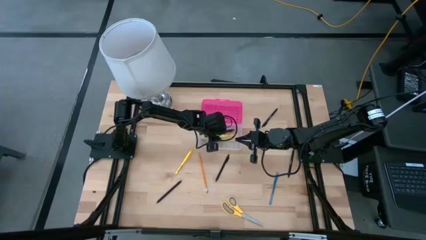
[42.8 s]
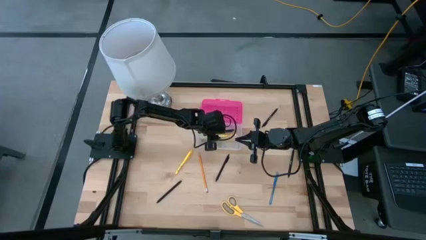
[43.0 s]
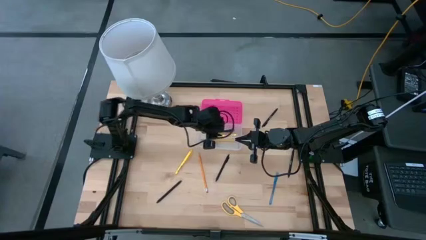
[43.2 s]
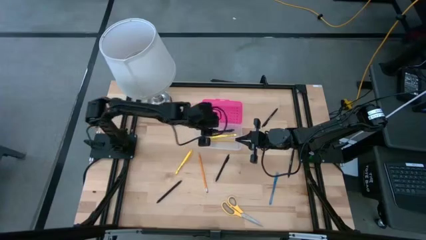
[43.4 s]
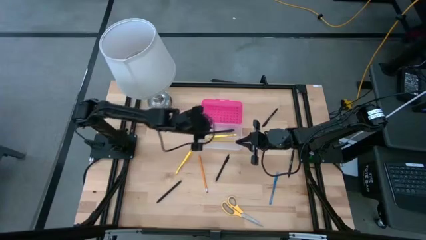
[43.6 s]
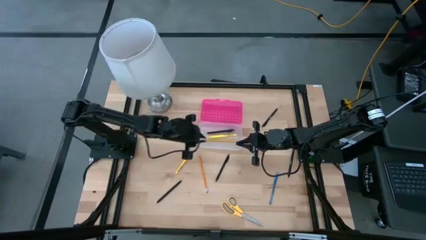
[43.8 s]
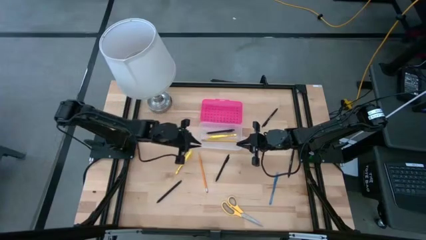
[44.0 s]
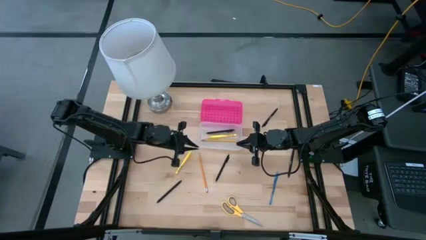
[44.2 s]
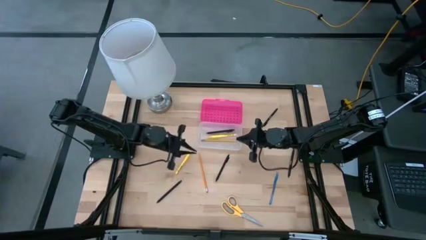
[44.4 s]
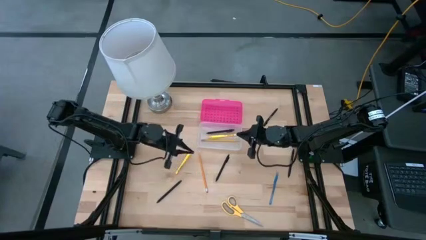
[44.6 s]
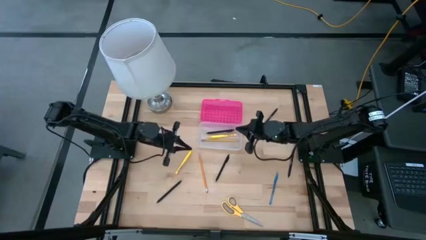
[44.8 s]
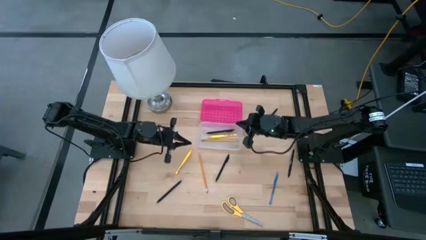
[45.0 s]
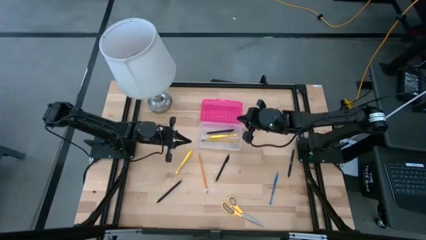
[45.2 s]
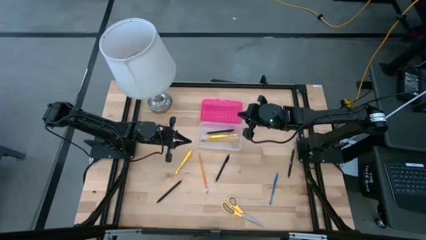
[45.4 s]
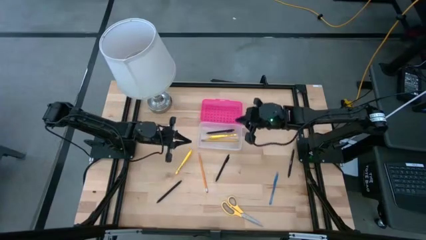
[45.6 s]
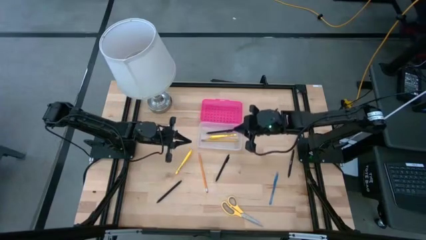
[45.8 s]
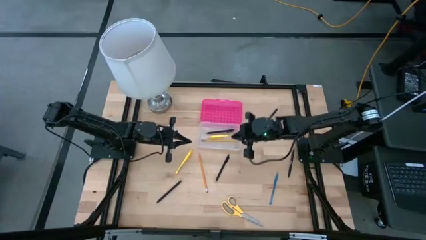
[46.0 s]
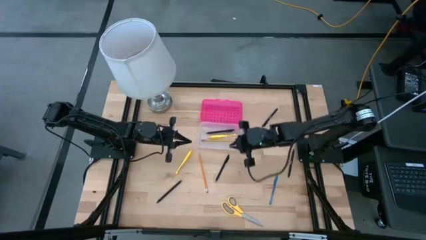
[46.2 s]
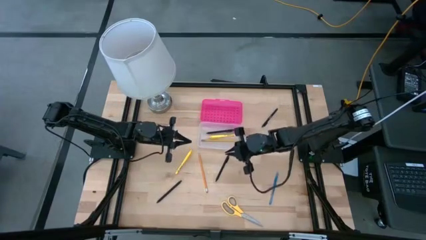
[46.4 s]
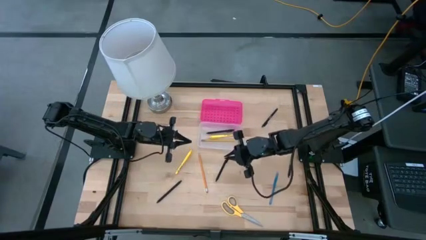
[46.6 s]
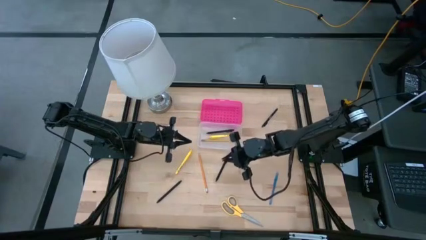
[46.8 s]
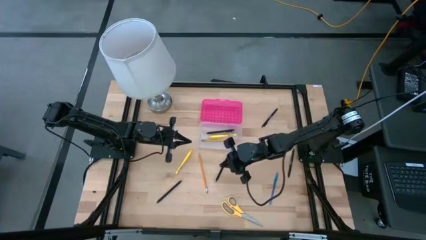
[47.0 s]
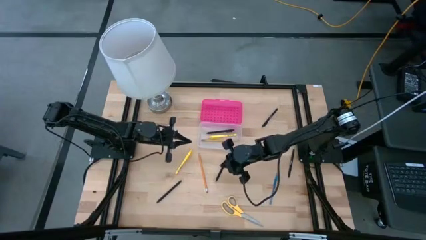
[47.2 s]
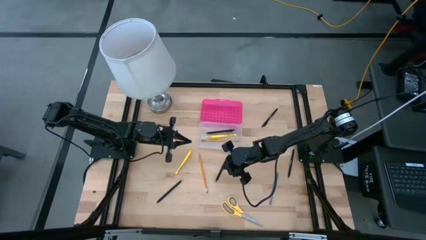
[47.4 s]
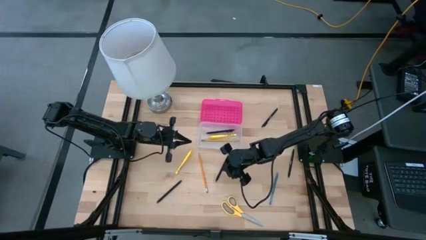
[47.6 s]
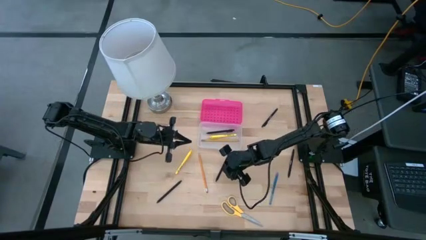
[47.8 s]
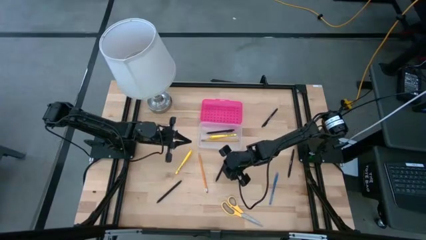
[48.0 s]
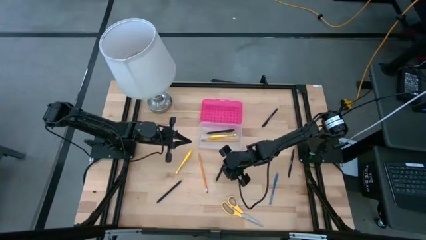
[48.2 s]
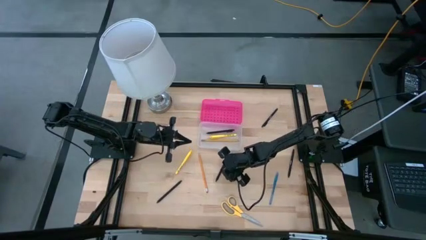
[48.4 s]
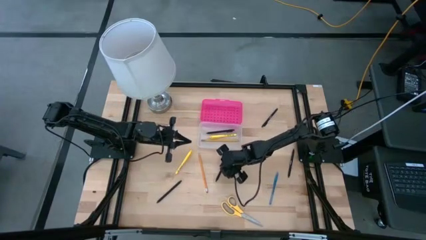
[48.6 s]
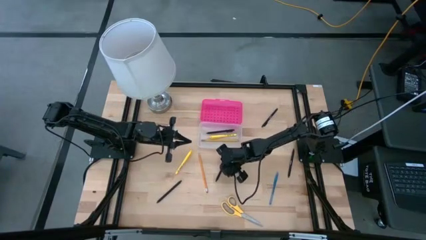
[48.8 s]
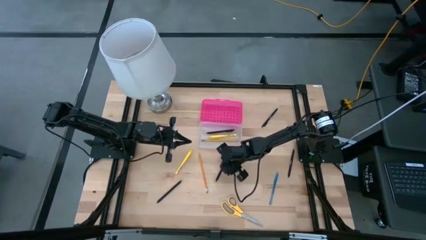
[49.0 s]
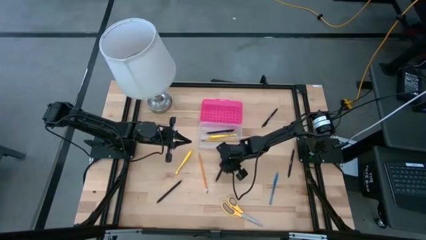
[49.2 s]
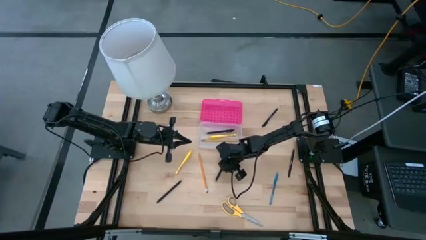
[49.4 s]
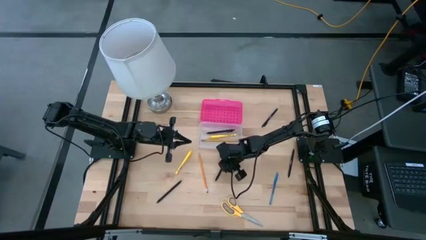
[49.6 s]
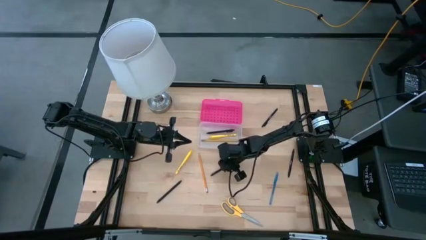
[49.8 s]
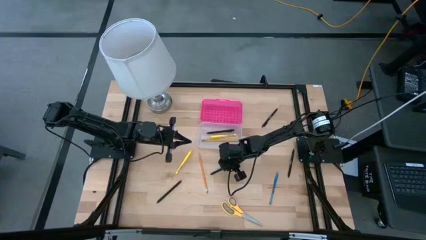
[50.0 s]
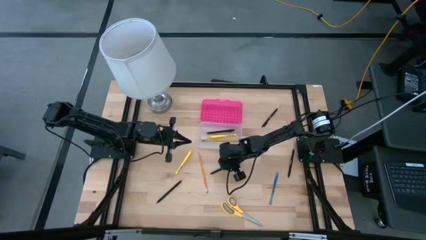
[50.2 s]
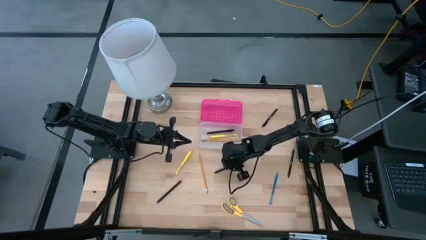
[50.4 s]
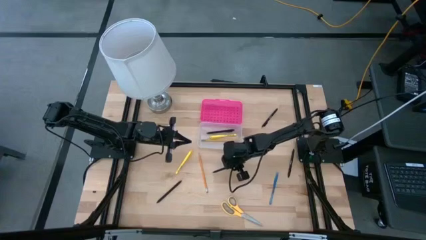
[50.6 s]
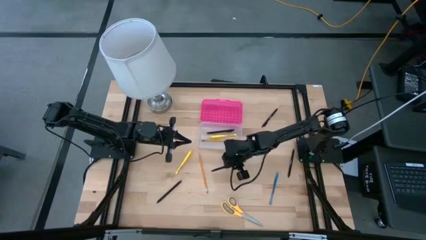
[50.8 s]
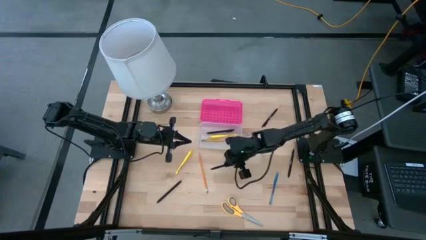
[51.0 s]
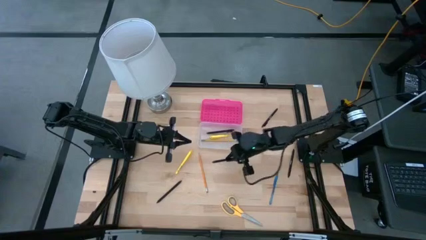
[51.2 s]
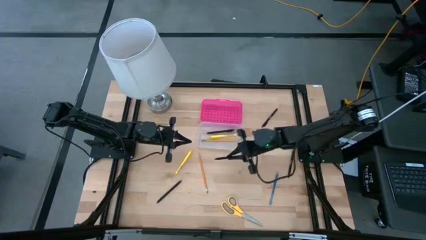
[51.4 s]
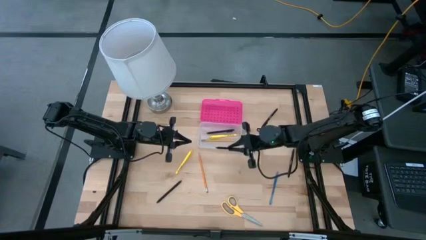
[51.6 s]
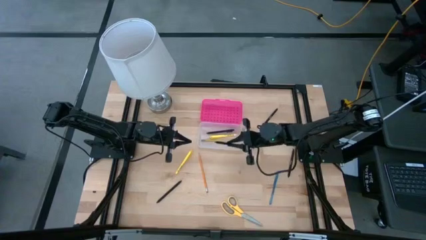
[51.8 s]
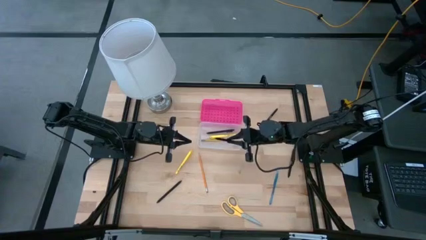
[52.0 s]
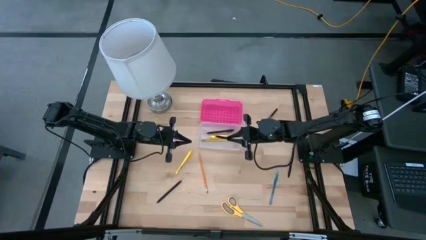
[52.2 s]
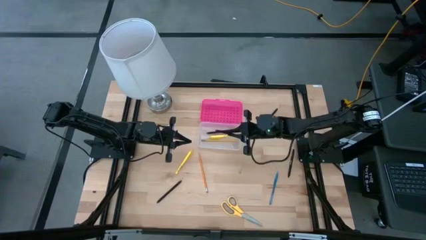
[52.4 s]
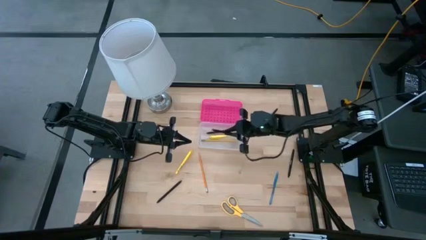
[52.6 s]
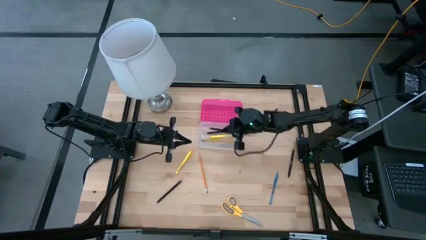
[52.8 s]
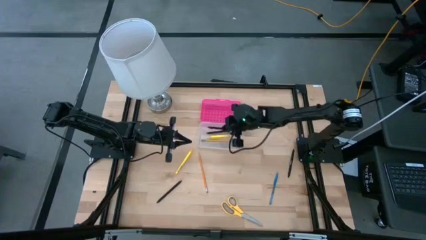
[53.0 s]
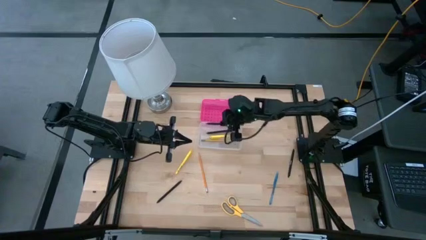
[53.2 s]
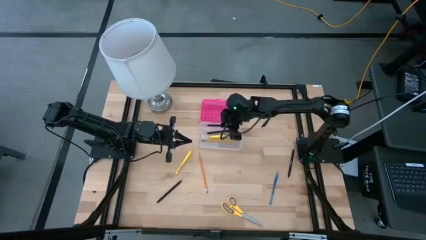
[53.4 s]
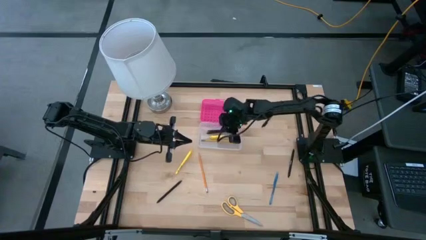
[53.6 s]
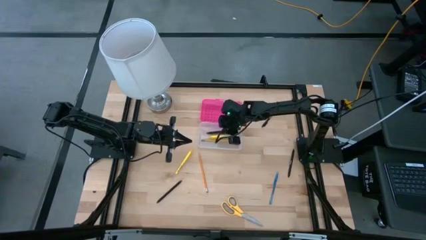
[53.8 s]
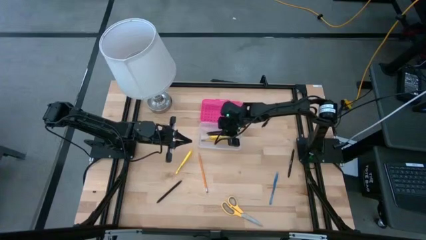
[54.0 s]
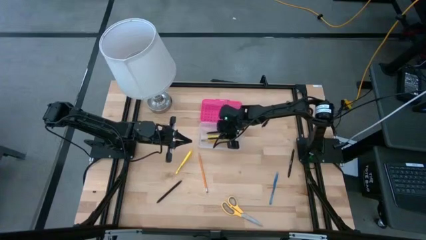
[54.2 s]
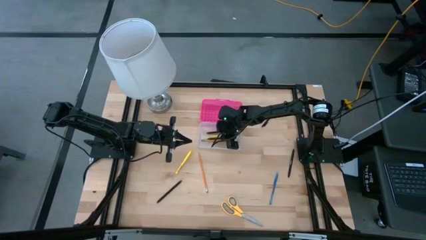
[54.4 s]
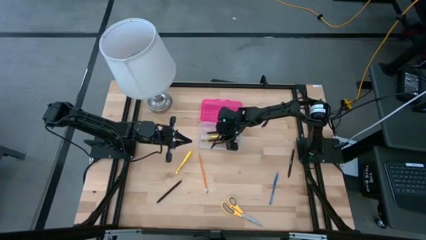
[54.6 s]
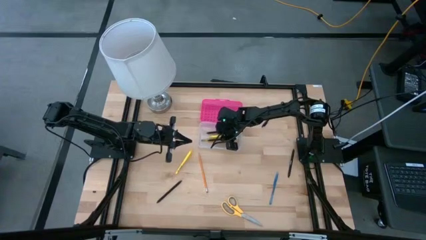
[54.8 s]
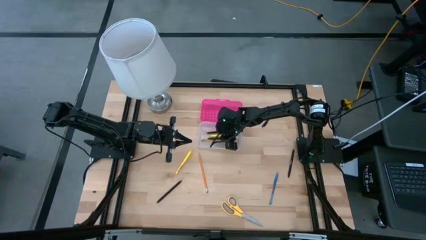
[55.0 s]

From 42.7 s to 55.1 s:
Task: Pick & place school supplies into a supply box
Put the black pen into the pink supply box
